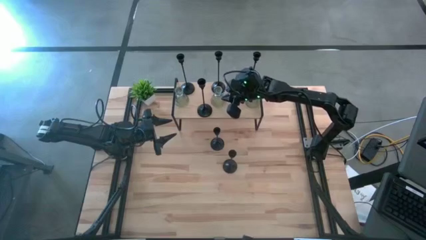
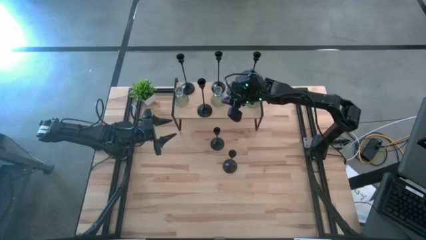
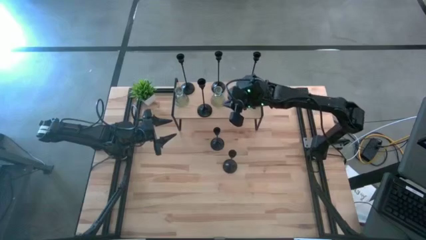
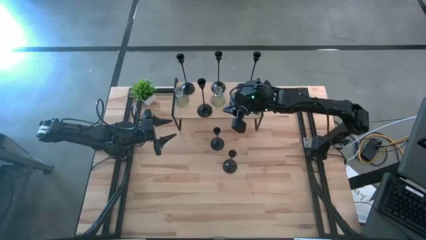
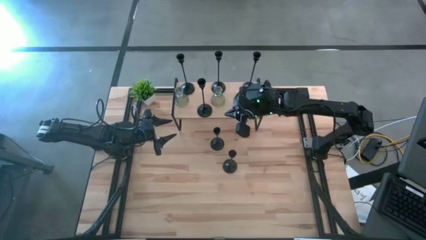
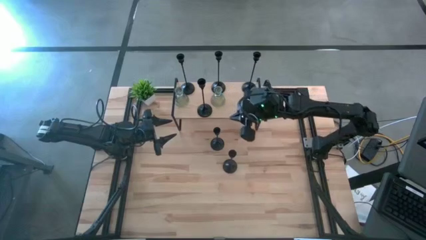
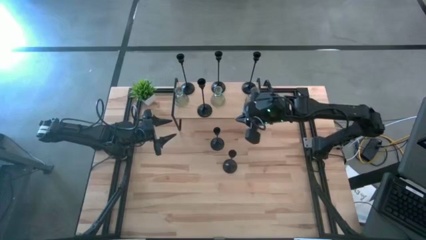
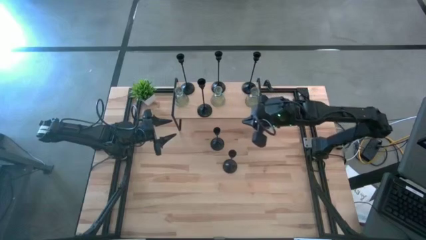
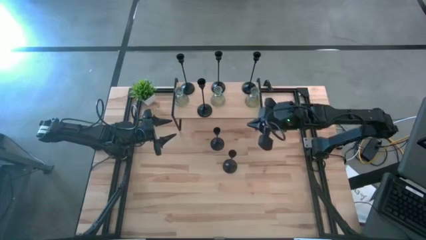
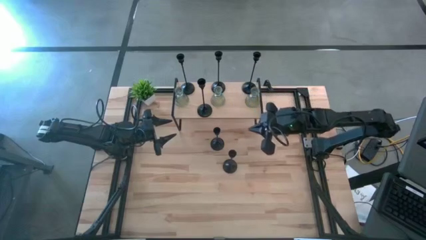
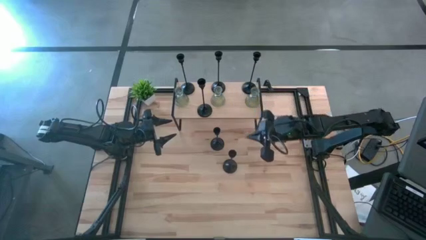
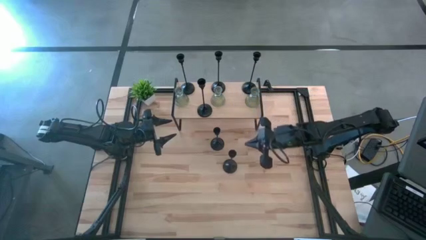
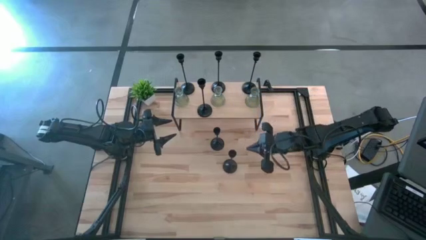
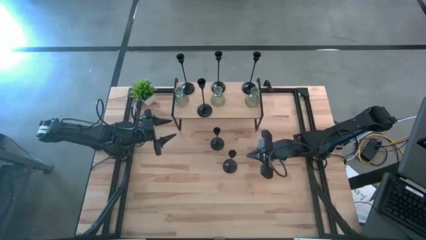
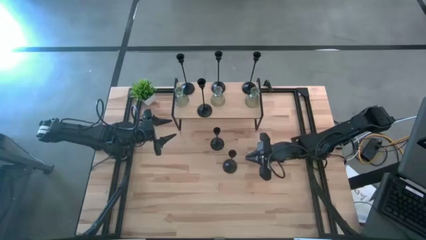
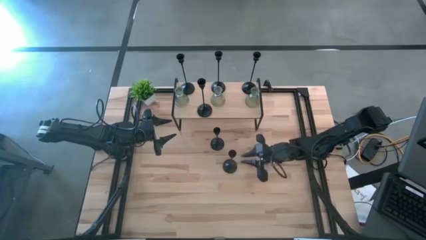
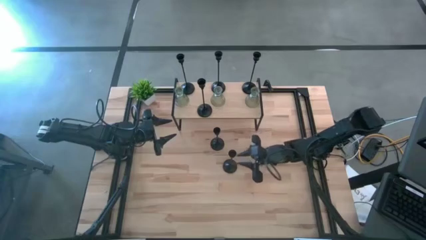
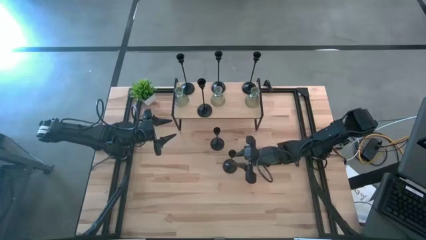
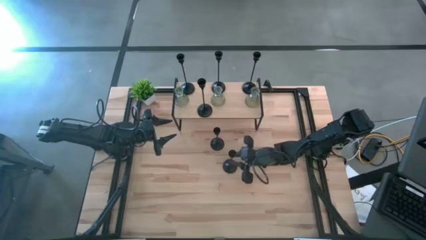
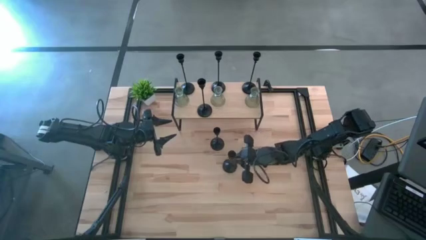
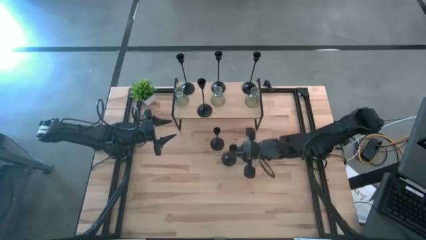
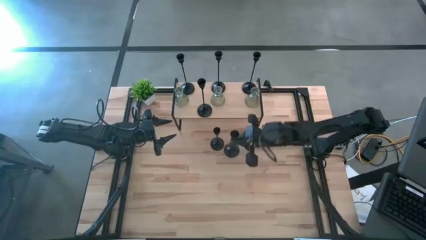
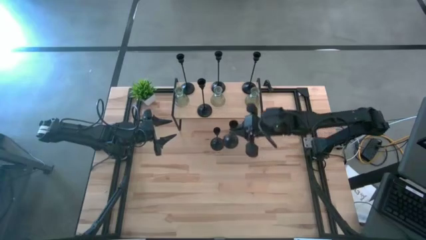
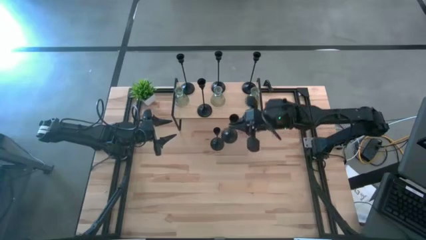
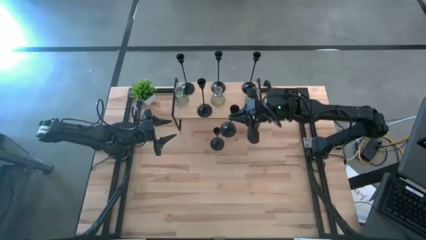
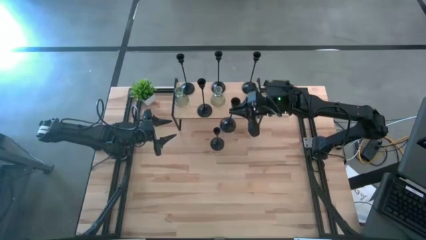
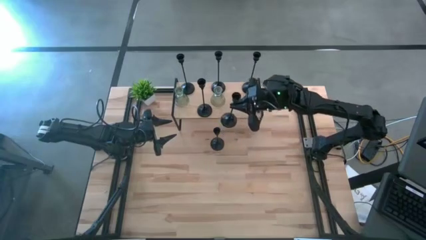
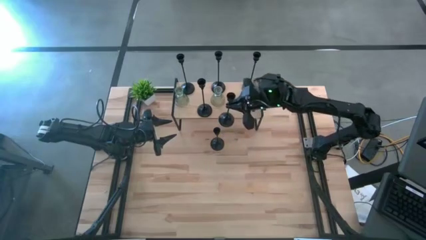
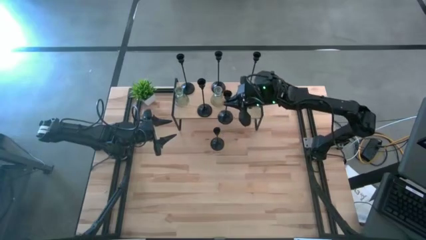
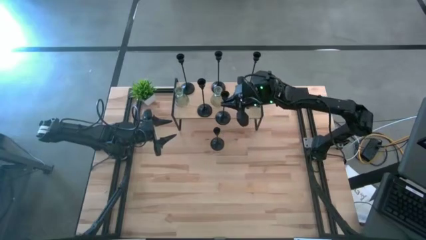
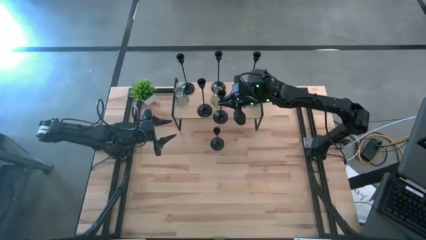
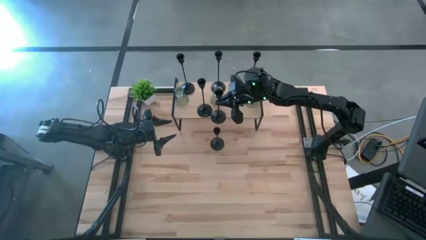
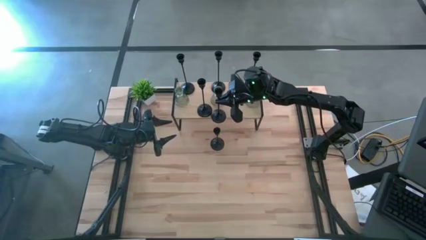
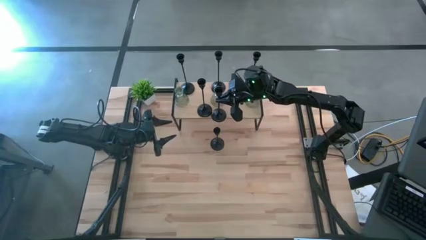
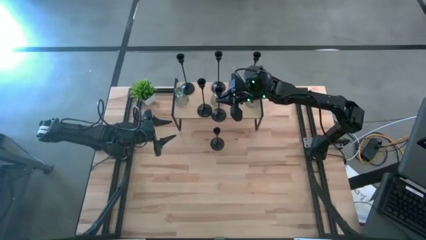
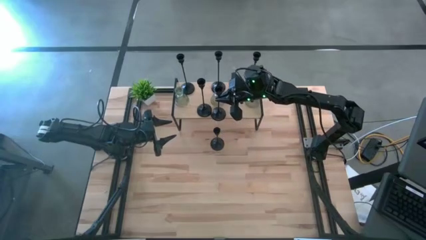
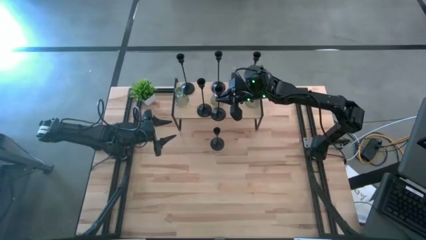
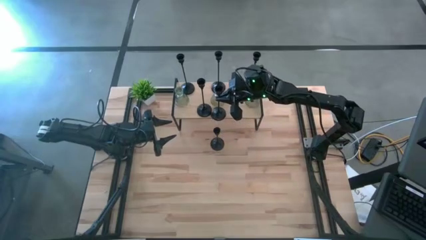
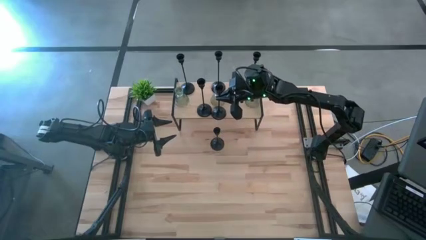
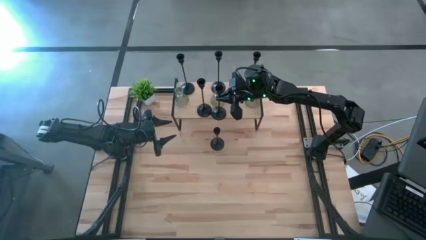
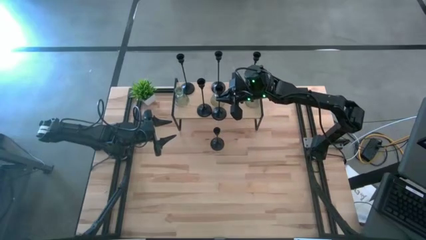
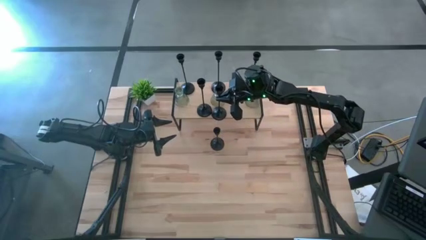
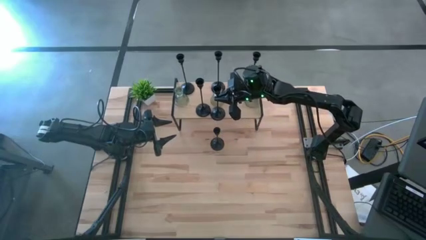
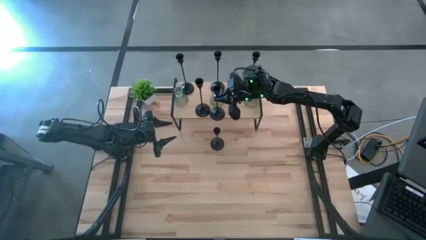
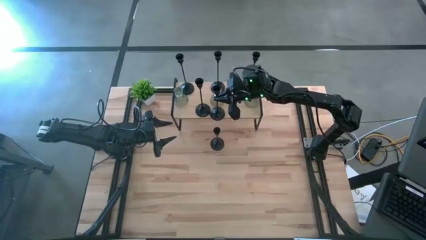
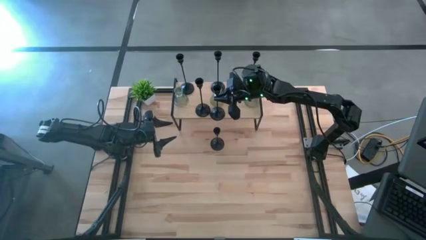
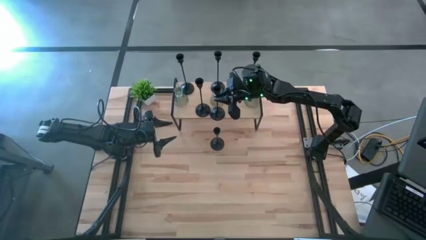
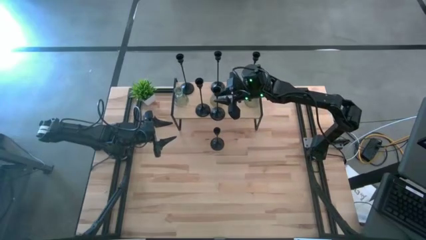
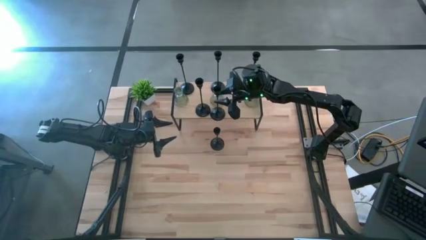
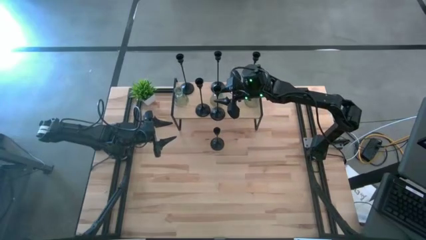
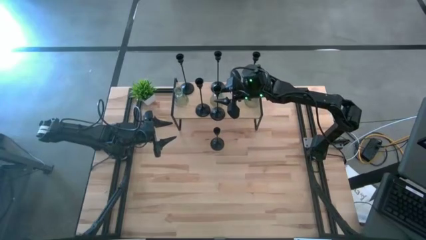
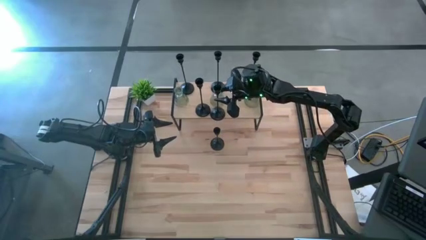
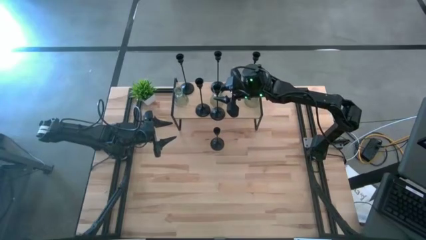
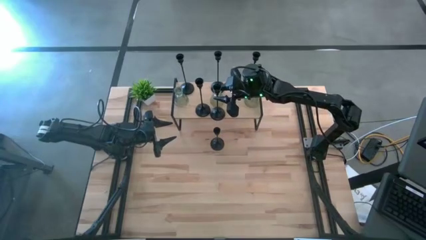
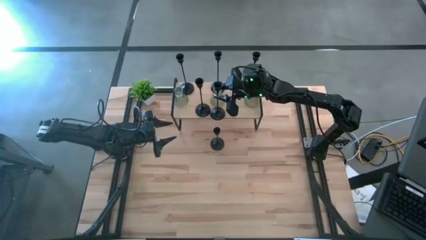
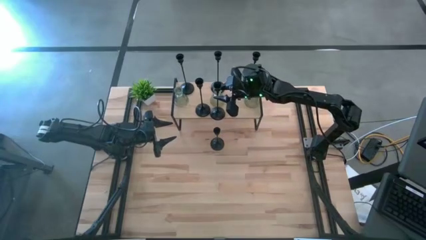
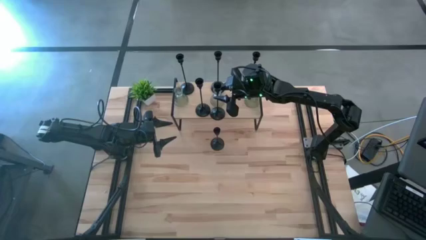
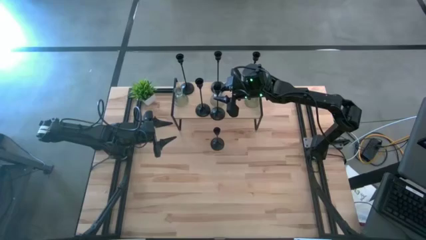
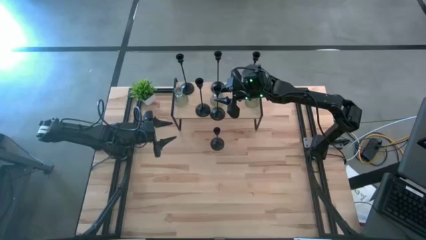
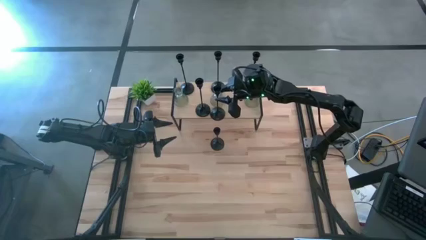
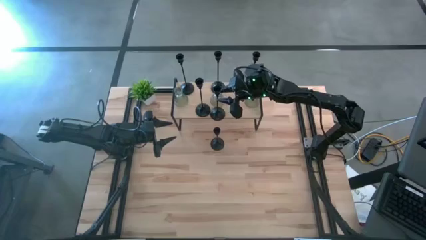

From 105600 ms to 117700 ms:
Task: Pick & Place candle stick holders
Put the black candle holder on the shelf

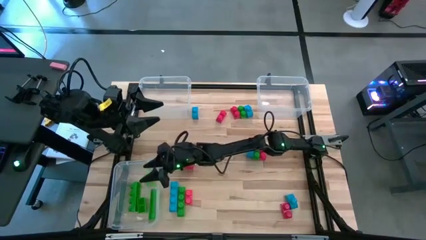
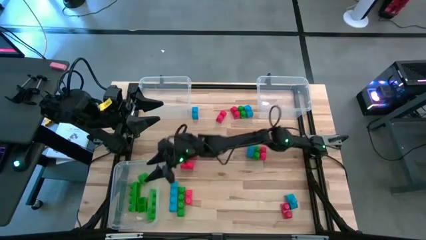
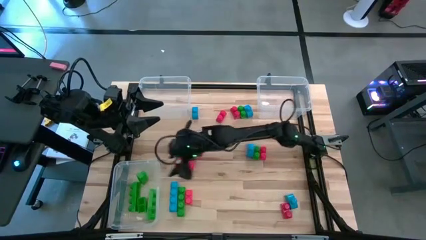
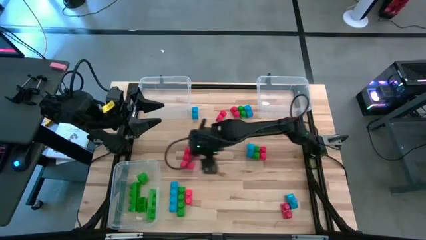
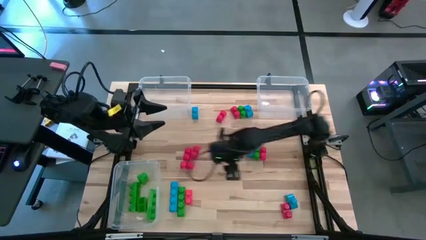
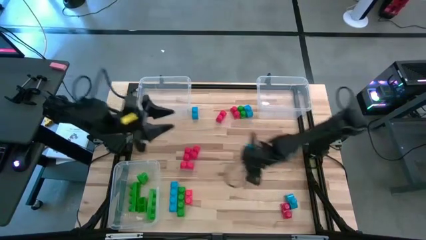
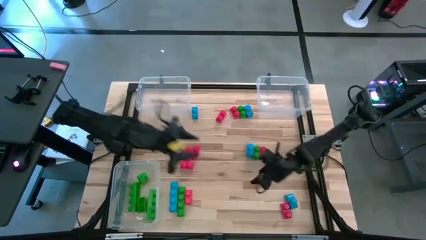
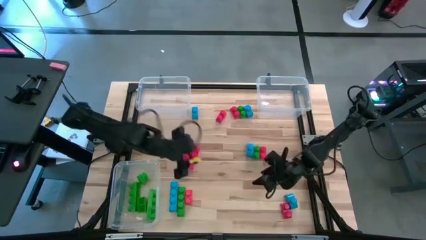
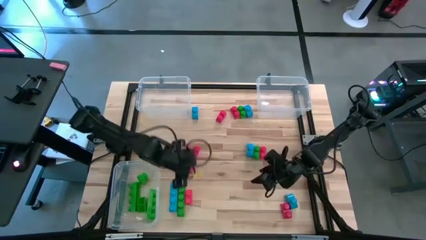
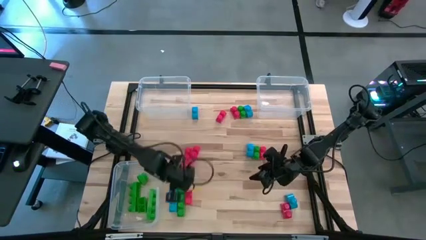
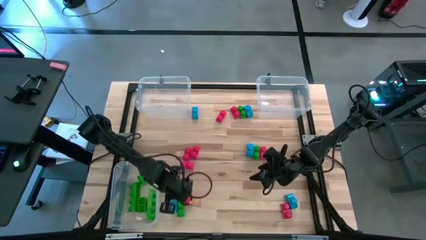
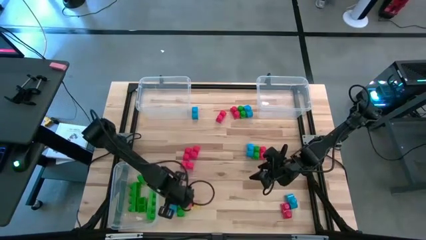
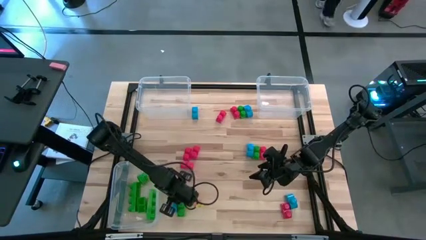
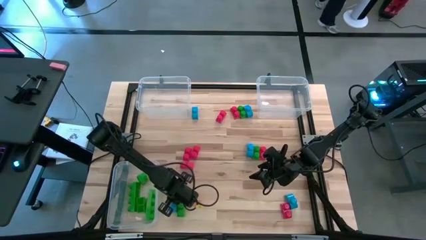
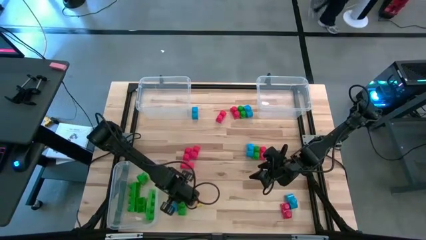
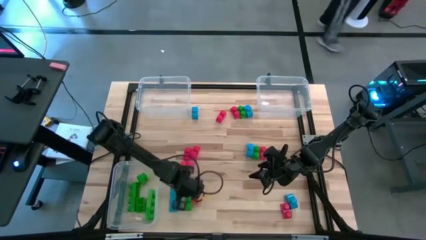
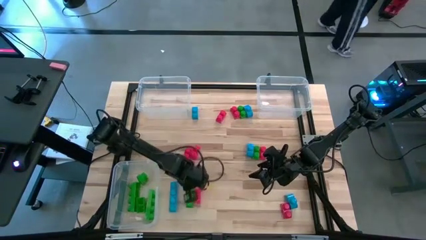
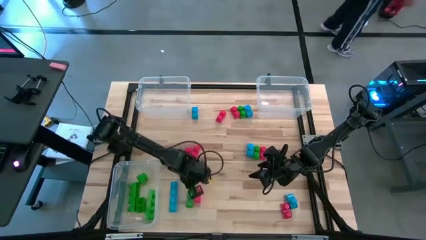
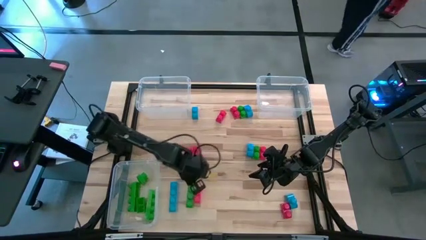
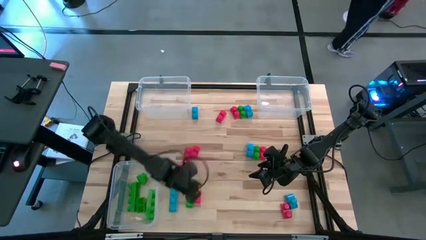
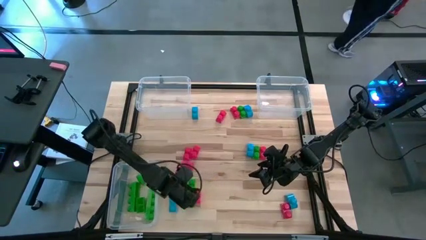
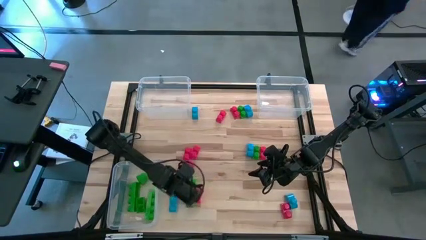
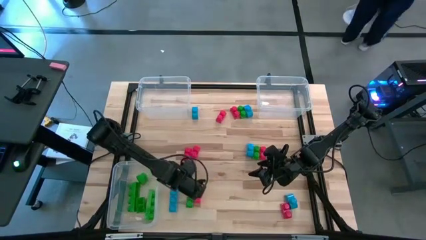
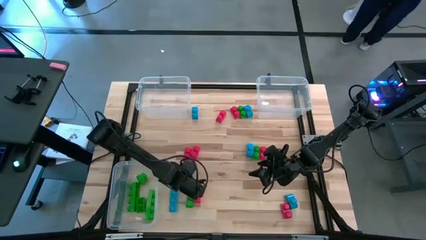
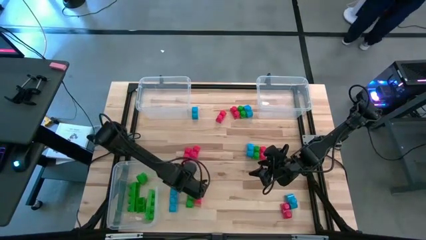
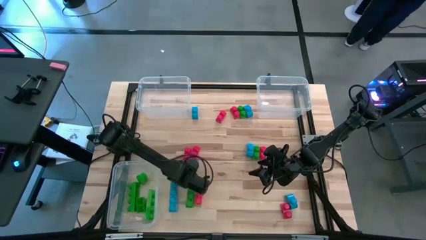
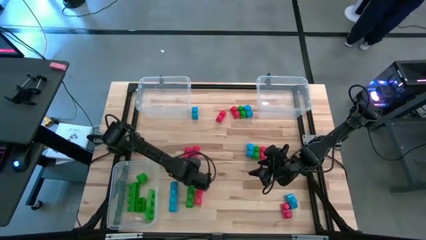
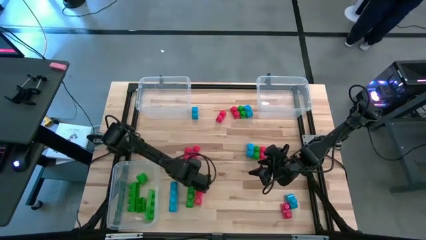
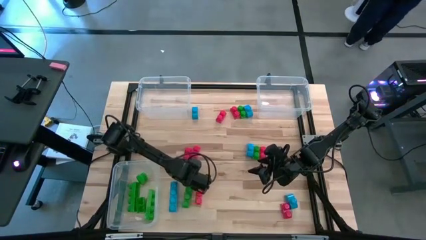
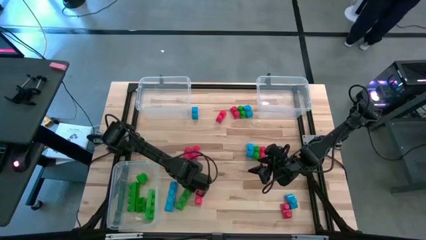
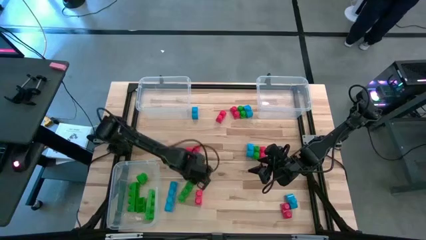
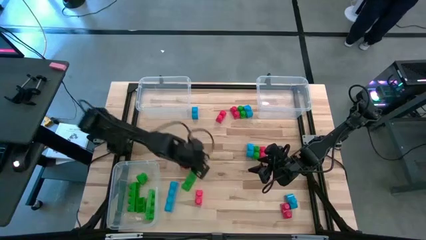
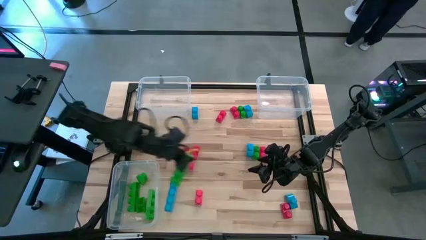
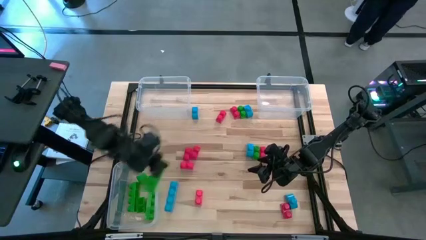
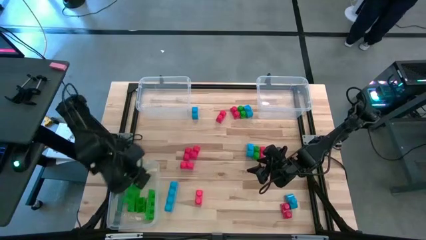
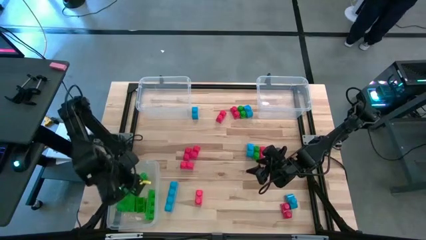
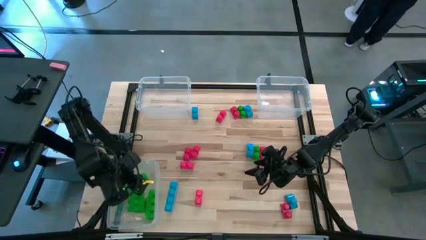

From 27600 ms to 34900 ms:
Task: Sort blocks
Put the green game piece into the bottom left transparent bin
